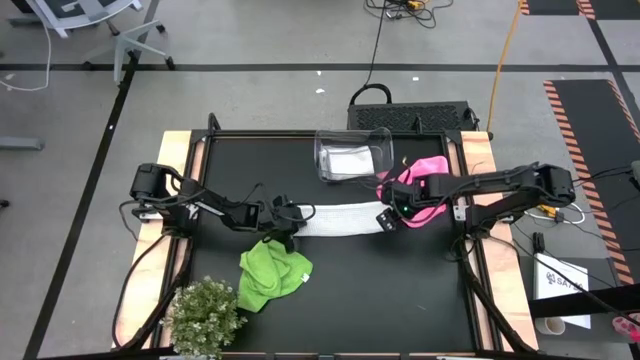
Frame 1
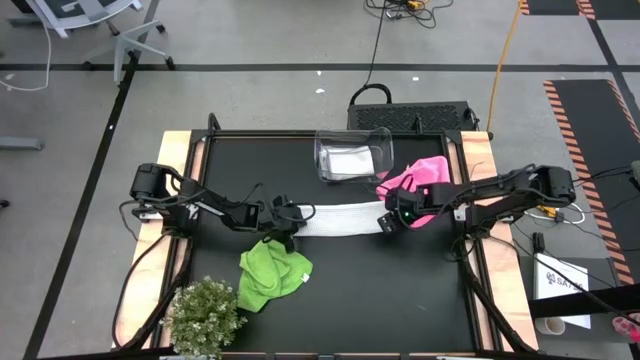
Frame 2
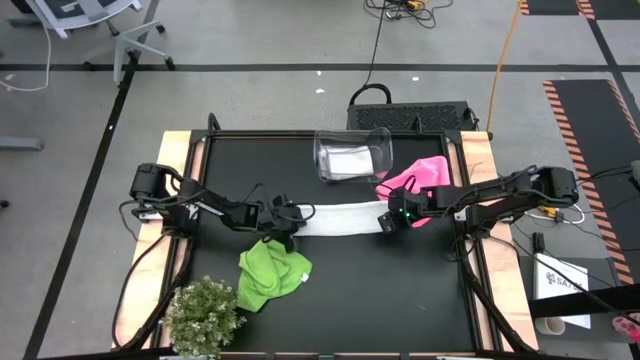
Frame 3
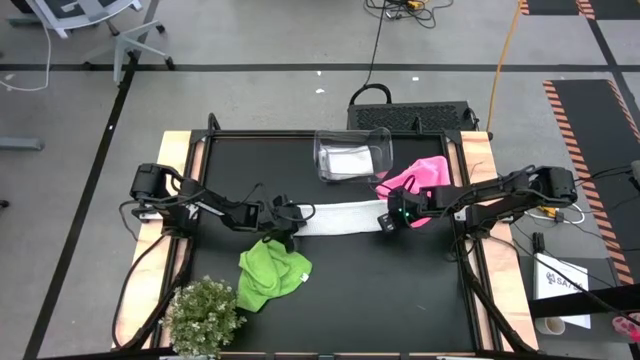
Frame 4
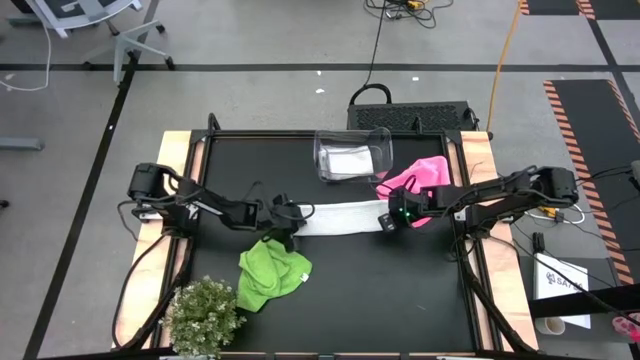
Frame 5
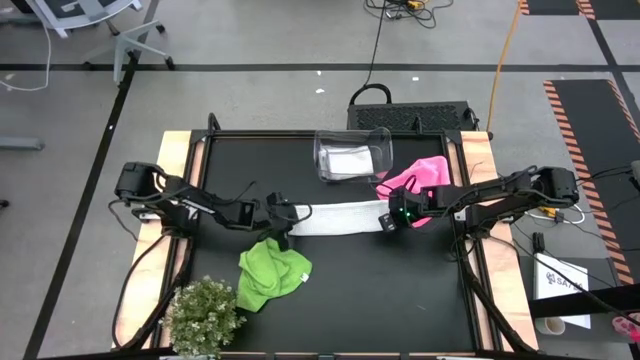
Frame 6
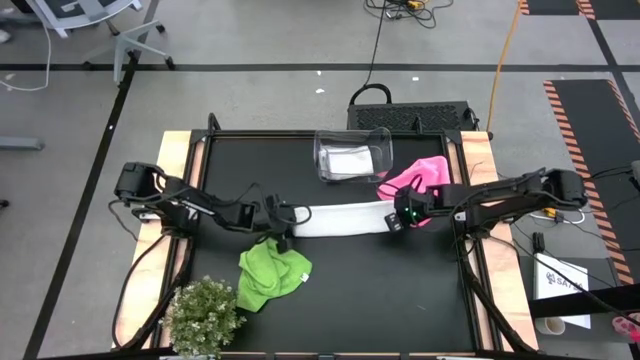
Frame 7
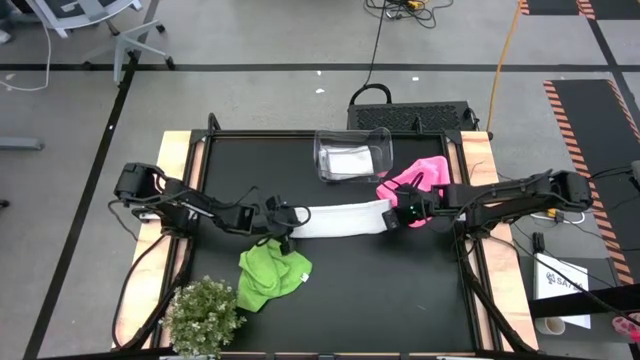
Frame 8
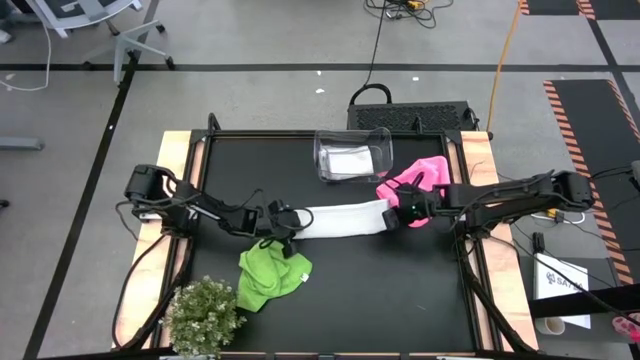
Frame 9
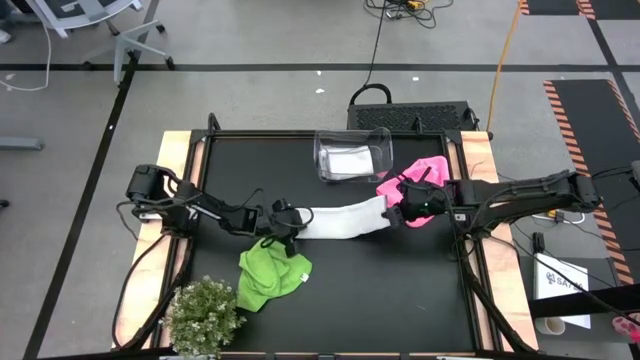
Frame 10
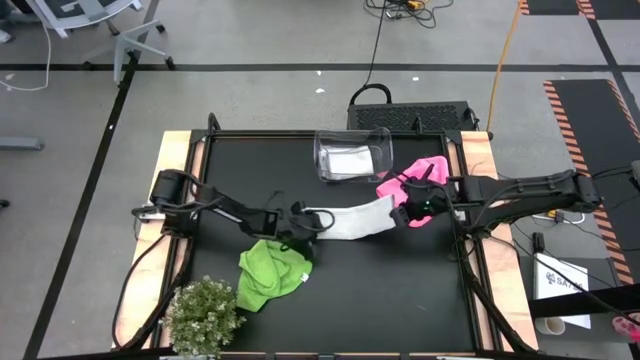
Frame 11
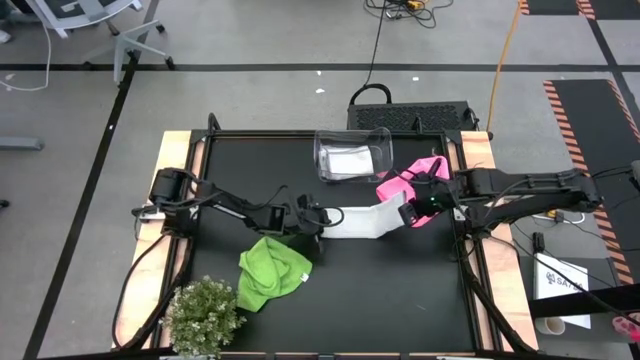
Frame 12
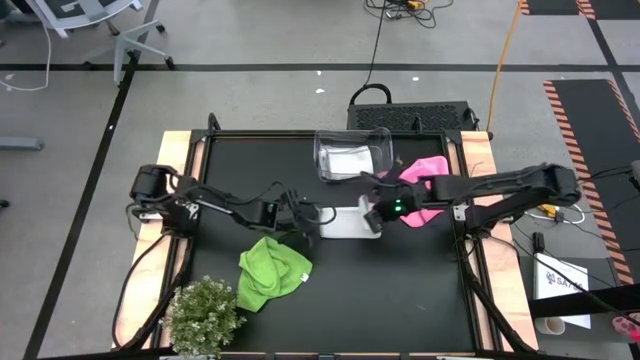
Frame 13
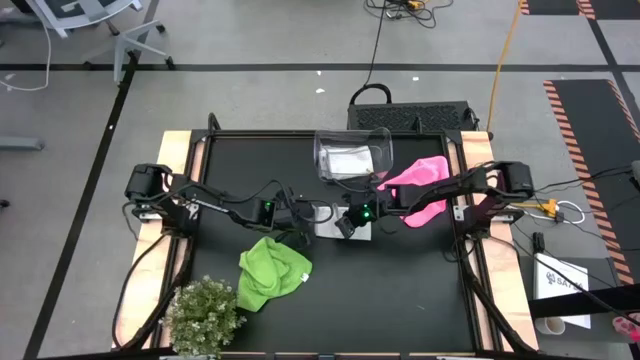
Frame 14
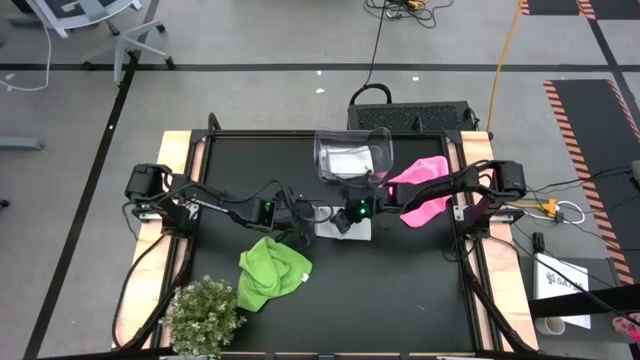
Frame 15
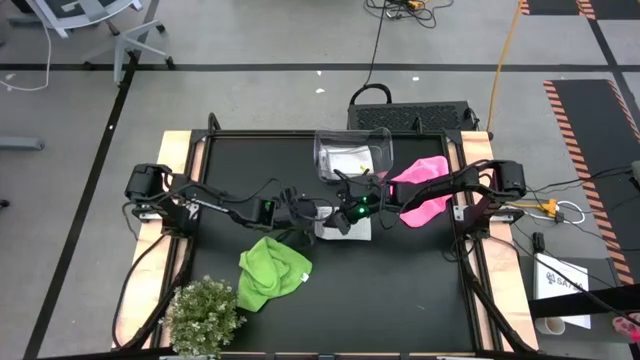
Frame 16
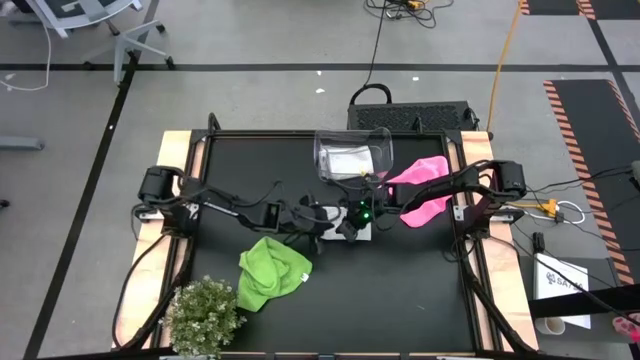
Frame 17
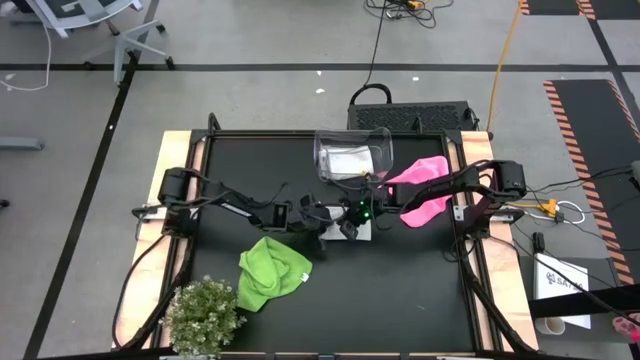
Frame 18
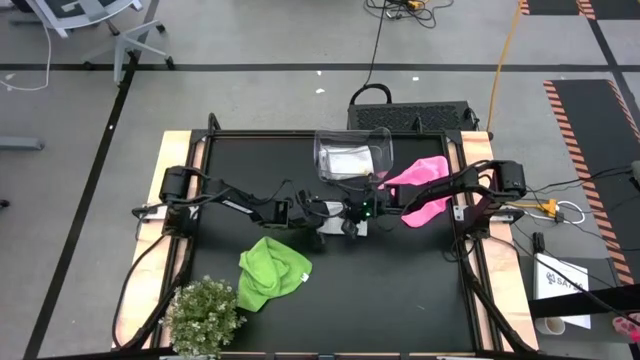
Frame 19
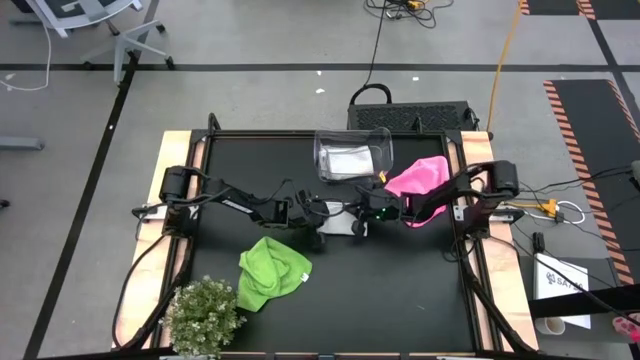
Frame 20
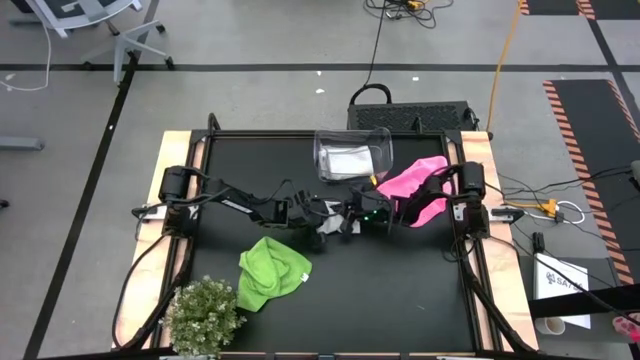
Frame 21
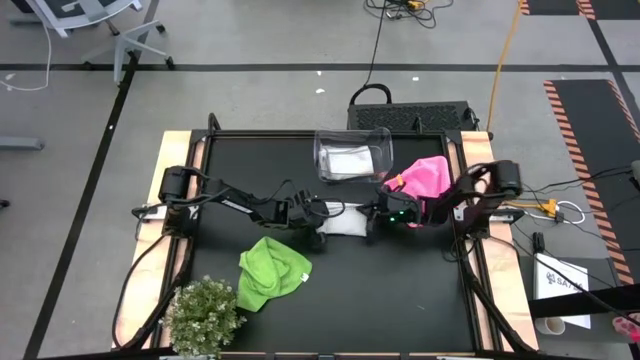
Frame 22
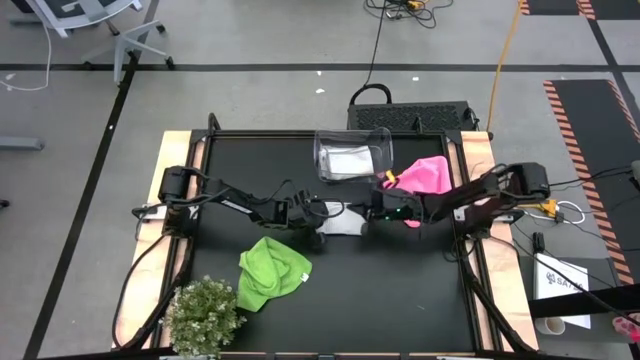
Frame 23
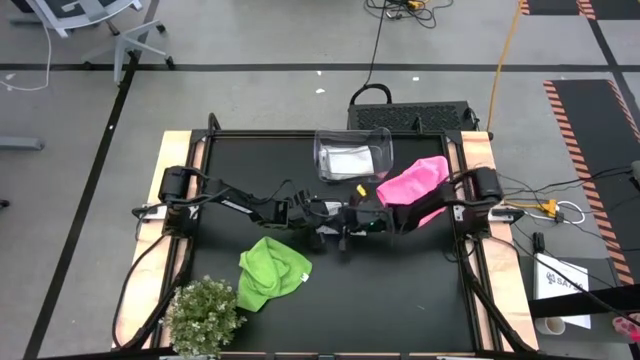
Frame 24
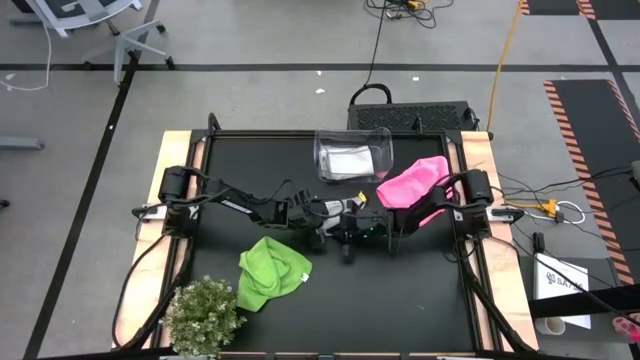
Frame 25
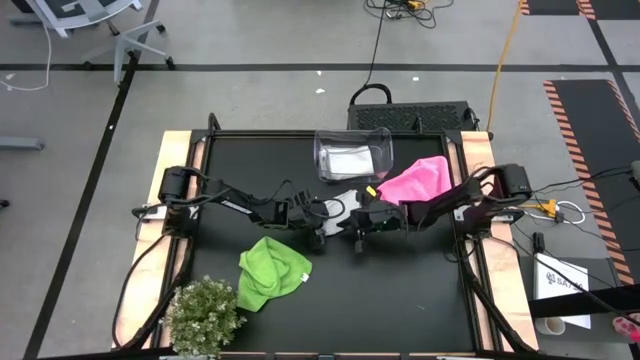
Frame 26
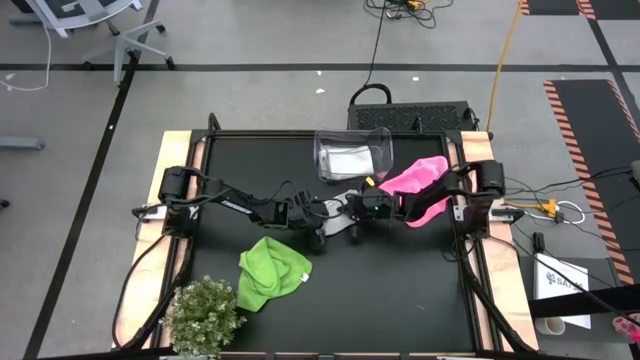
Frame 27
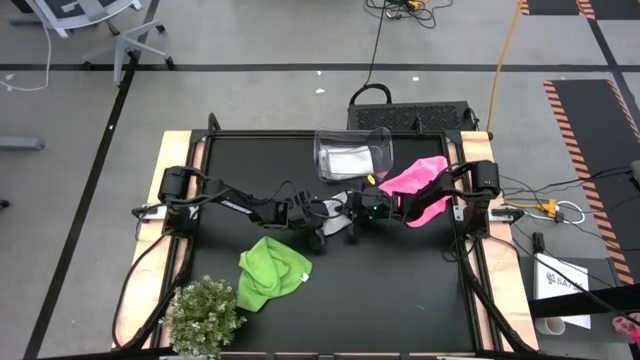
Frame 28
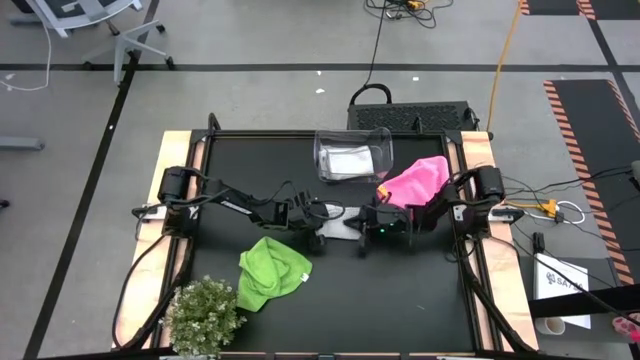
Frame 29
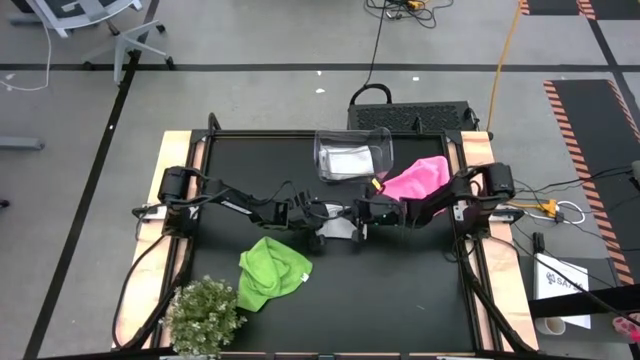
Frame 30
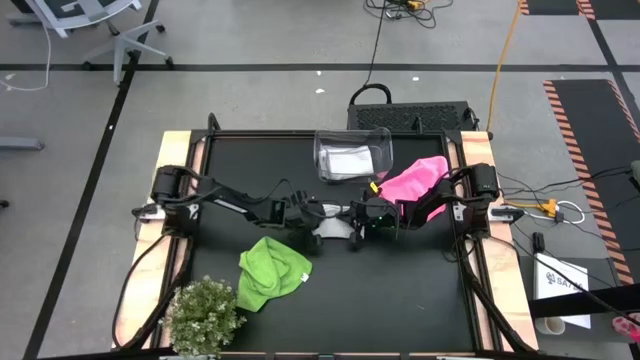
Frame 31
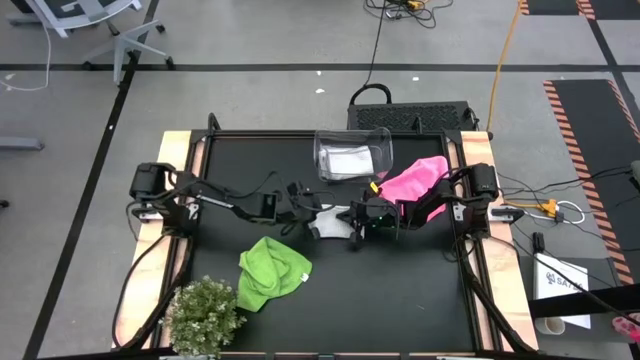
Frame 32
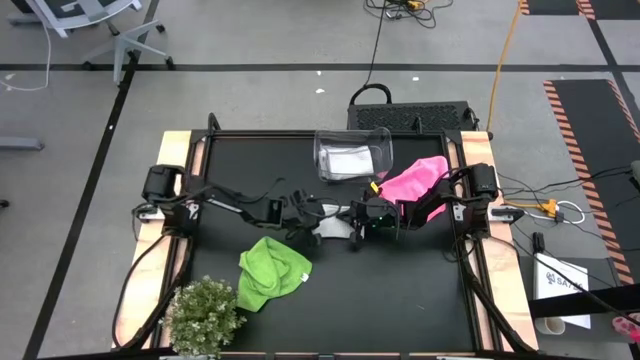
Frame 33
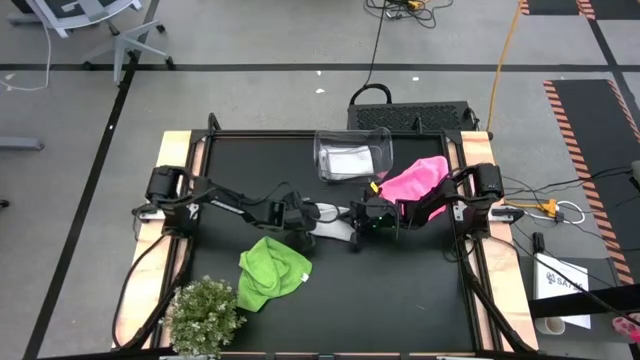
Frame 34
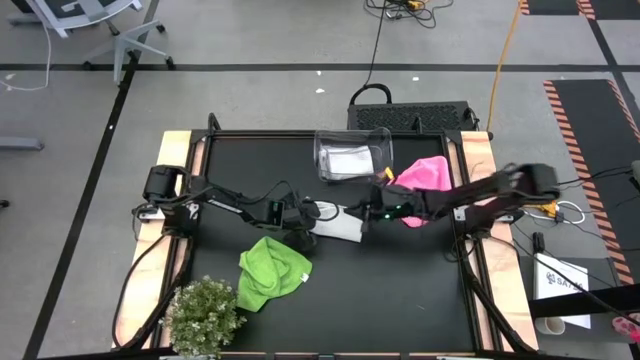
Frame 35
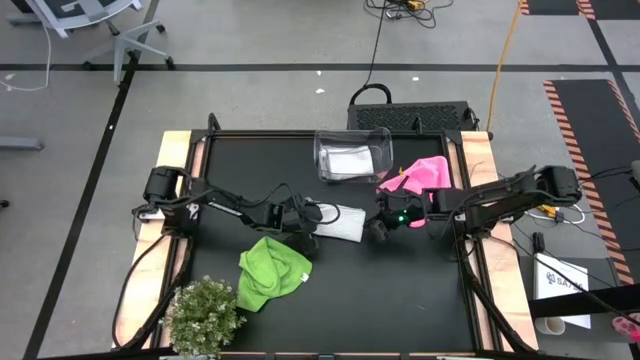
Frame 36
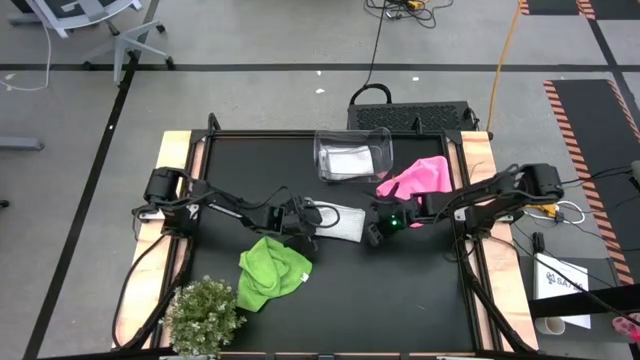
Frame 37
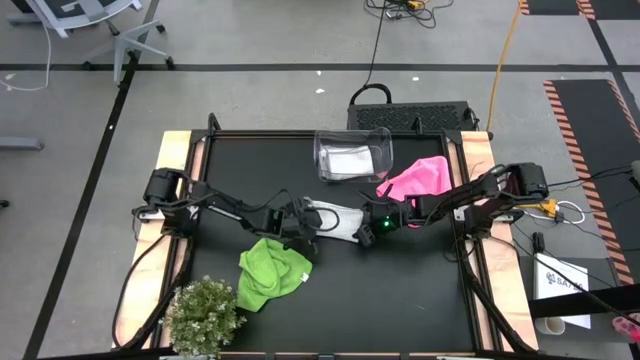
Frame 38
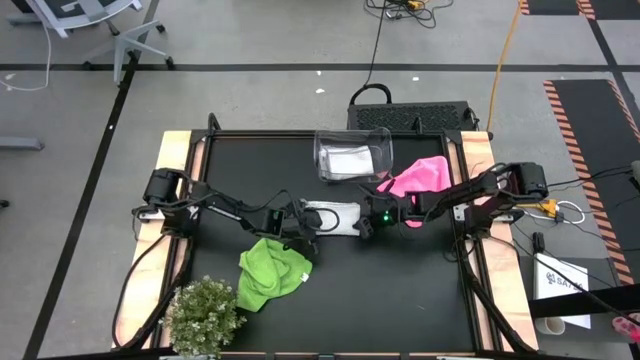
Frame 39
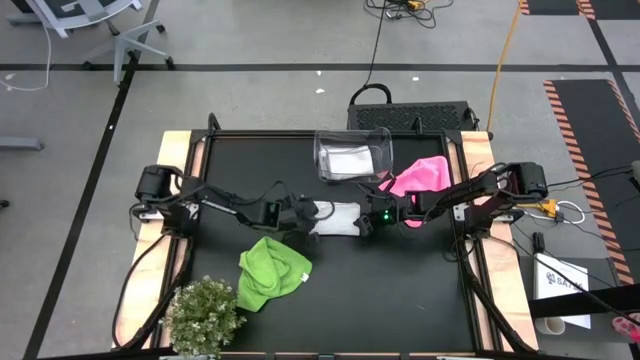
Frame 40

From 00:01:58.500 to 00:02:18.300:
Task: Fold microfiber towels
Fold the gray microfiber cloth

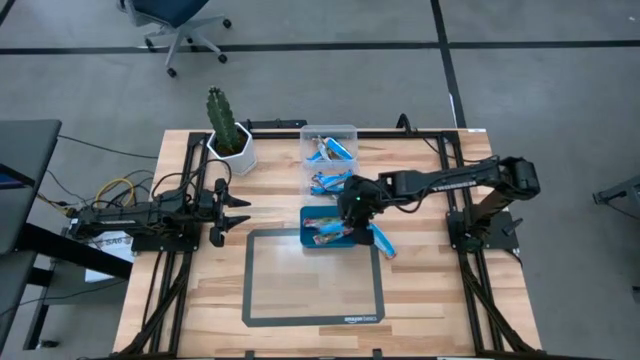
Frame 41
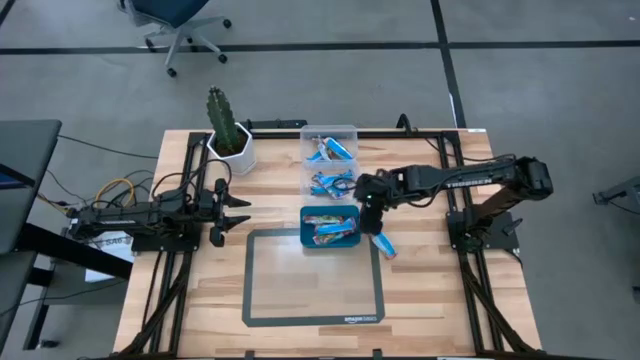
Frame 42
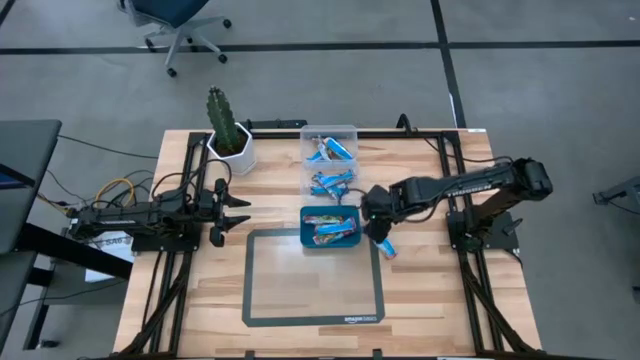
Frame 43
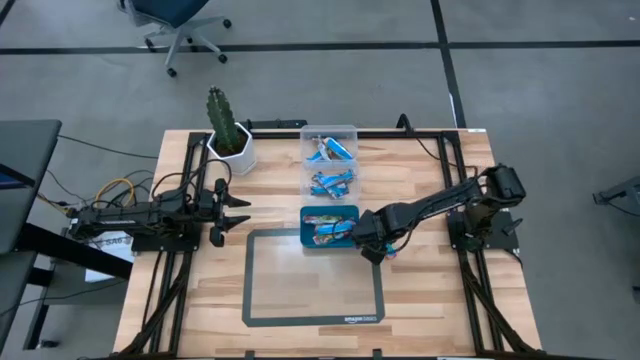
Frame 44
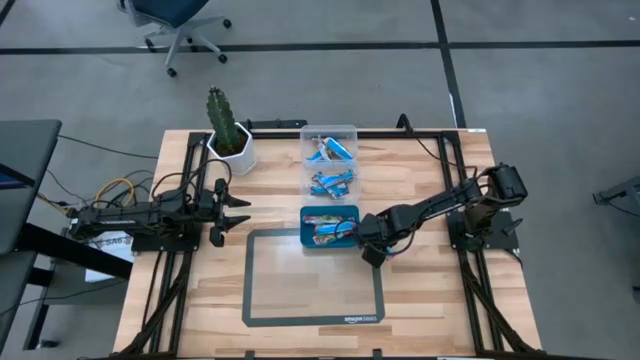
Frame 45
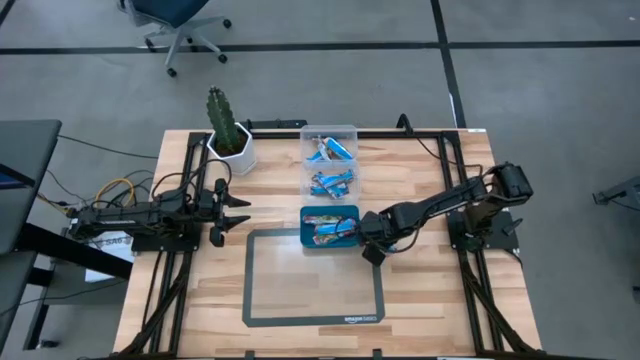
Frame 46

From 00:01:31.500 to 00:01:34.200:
Task: Pick and place Granola Bars by type
Put the red granola bar into the blue bin
